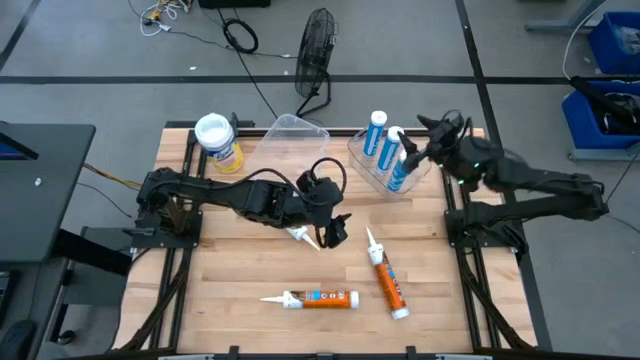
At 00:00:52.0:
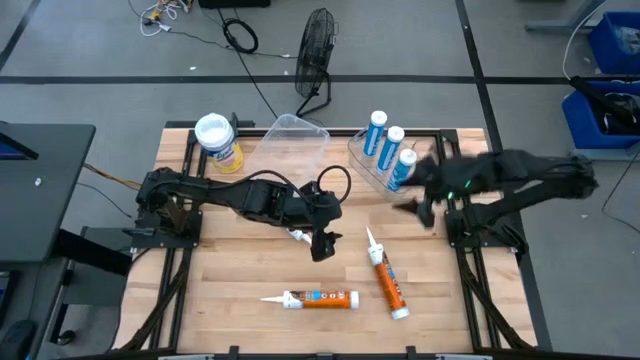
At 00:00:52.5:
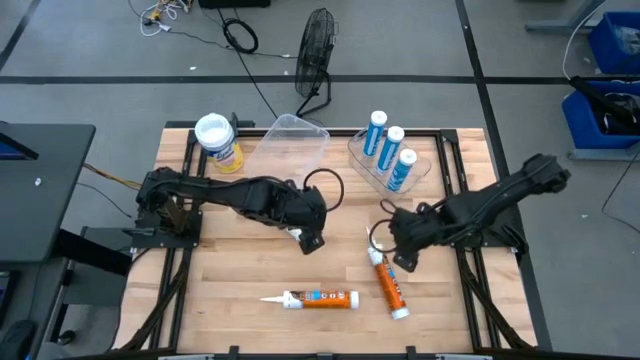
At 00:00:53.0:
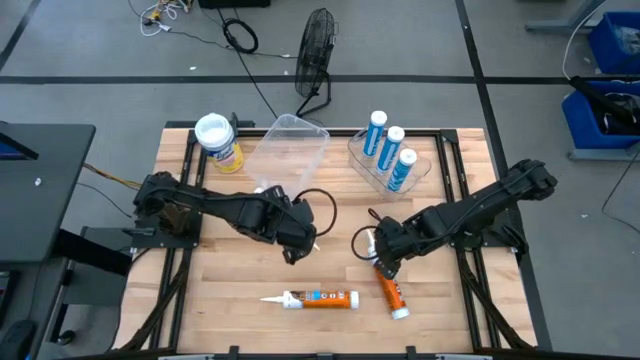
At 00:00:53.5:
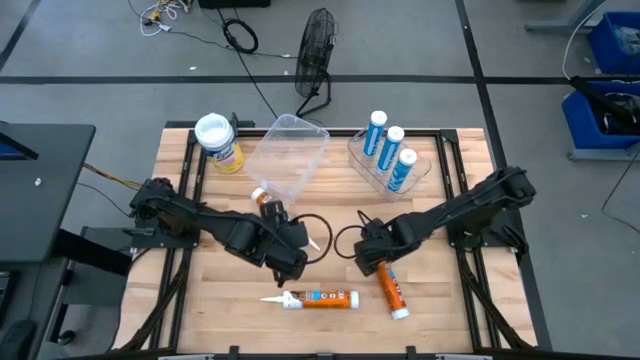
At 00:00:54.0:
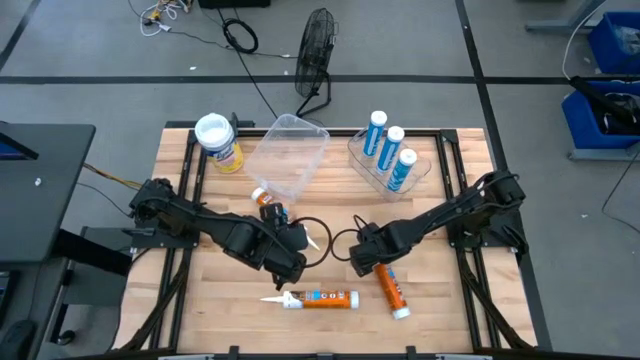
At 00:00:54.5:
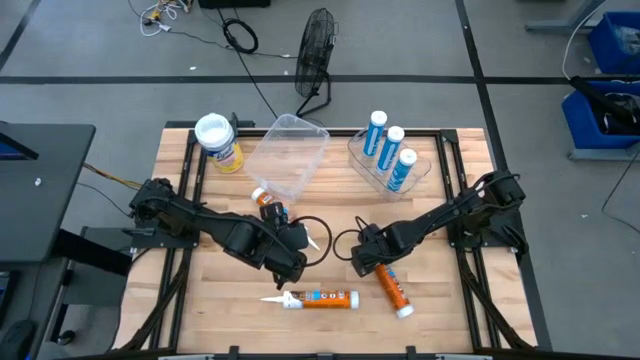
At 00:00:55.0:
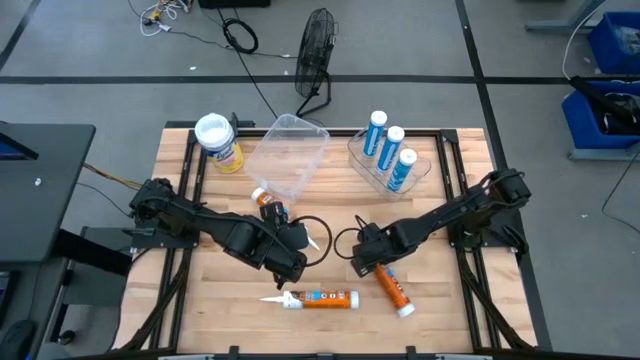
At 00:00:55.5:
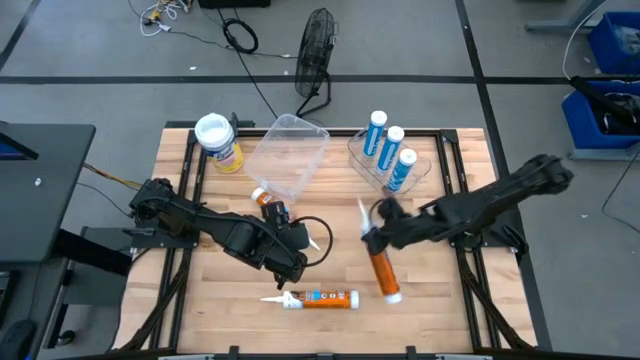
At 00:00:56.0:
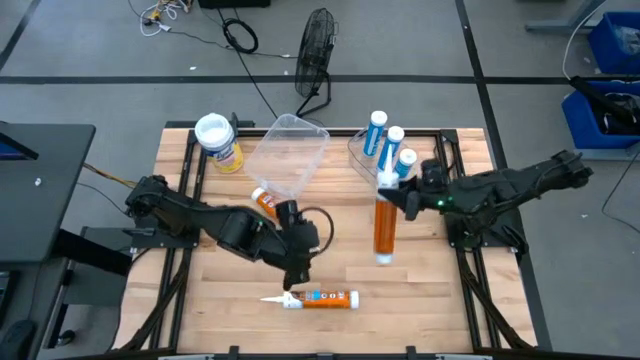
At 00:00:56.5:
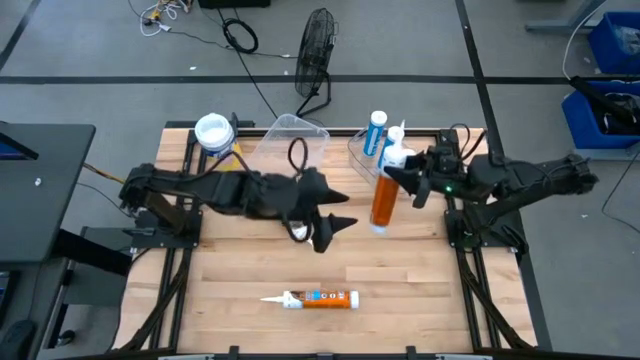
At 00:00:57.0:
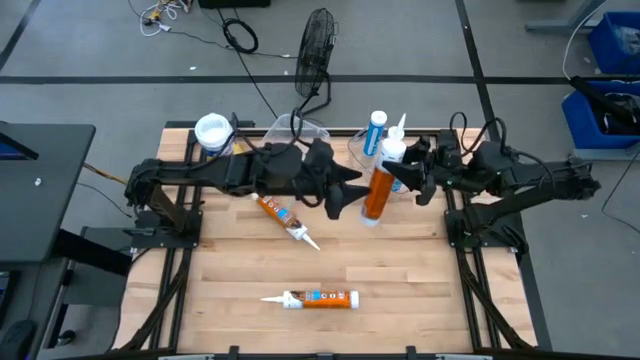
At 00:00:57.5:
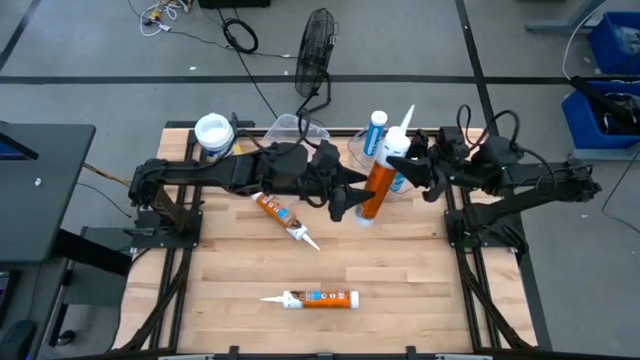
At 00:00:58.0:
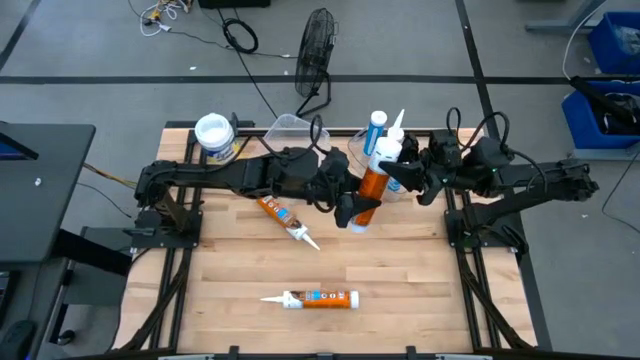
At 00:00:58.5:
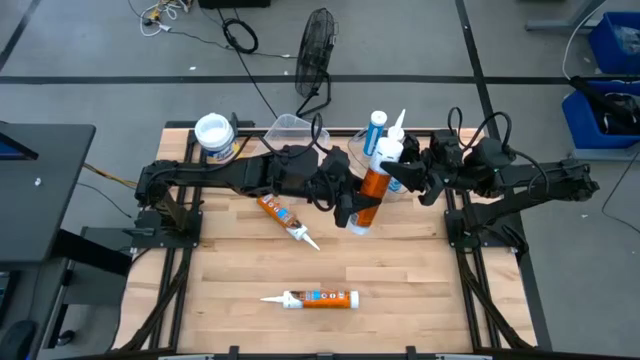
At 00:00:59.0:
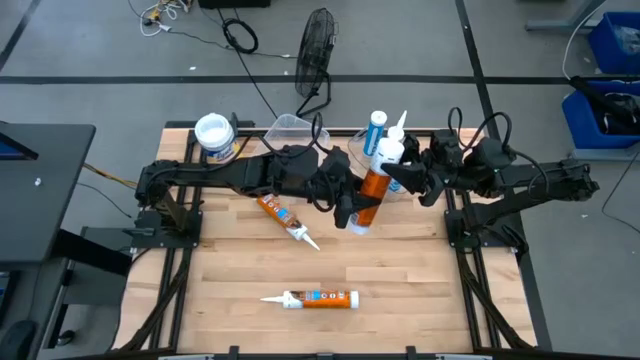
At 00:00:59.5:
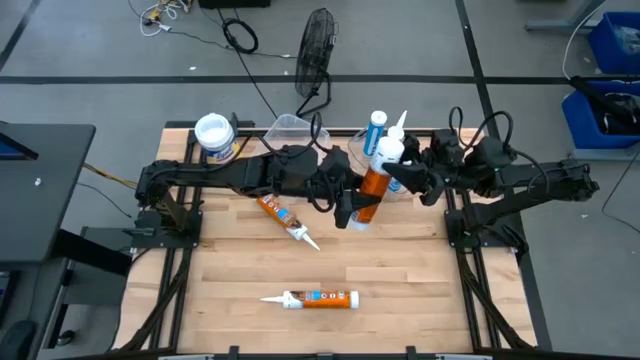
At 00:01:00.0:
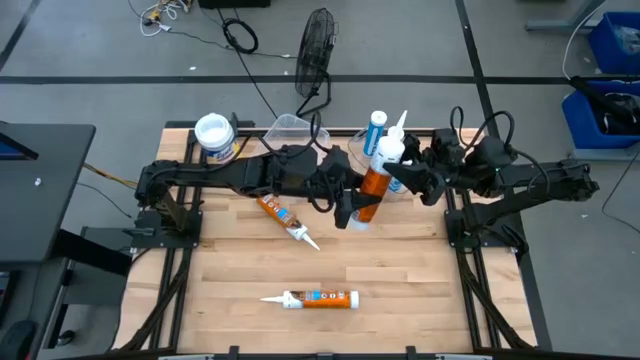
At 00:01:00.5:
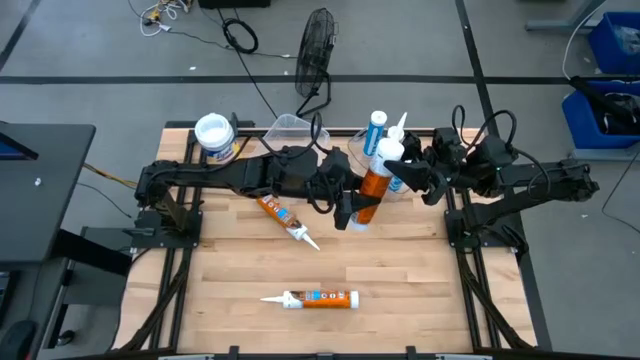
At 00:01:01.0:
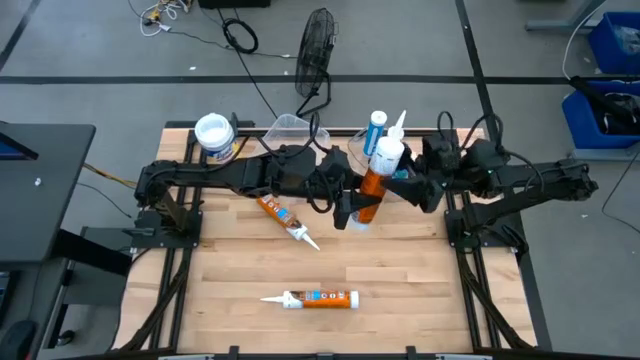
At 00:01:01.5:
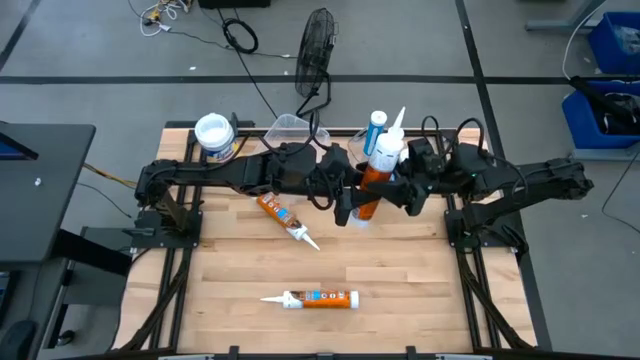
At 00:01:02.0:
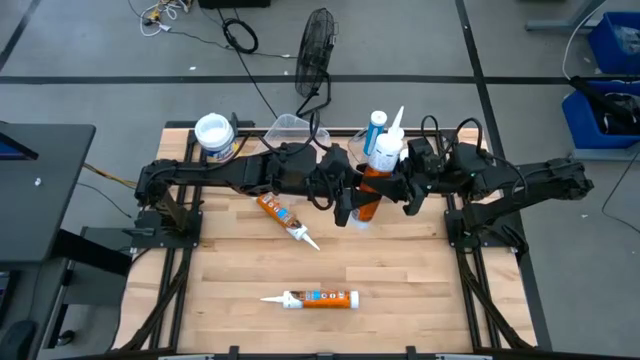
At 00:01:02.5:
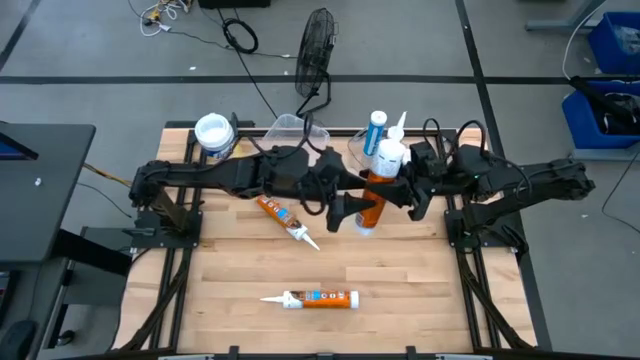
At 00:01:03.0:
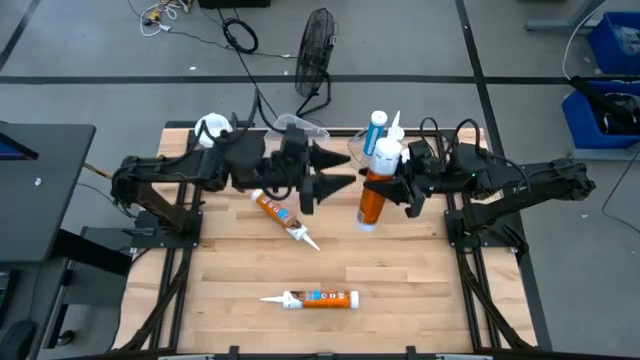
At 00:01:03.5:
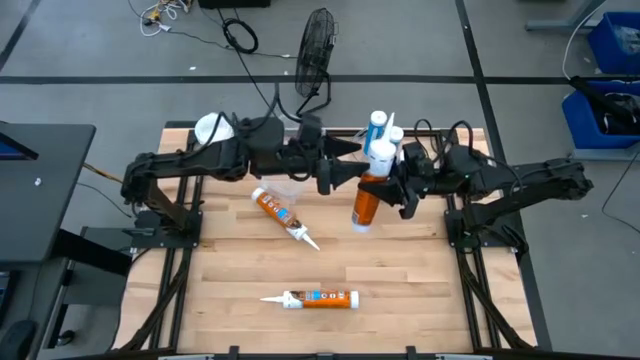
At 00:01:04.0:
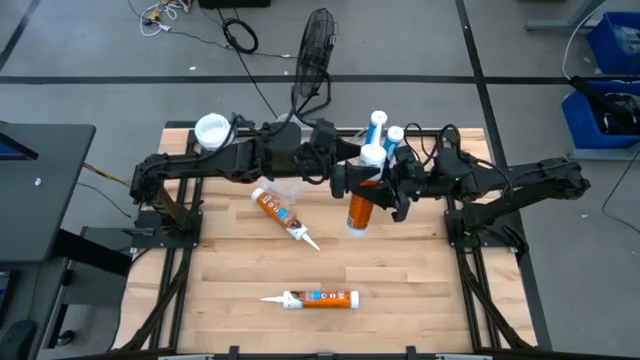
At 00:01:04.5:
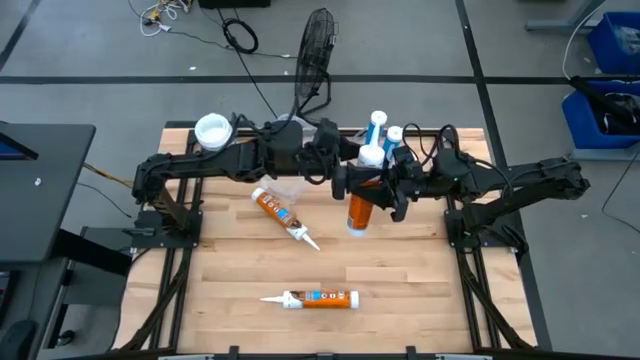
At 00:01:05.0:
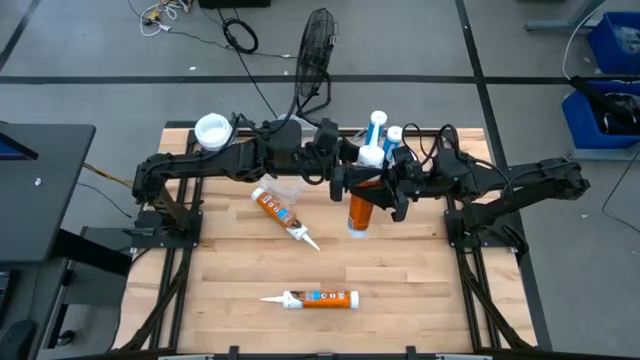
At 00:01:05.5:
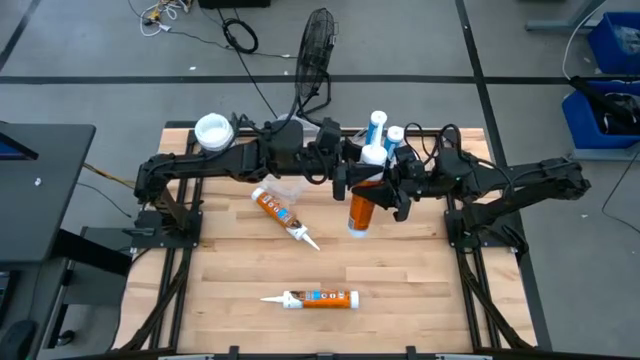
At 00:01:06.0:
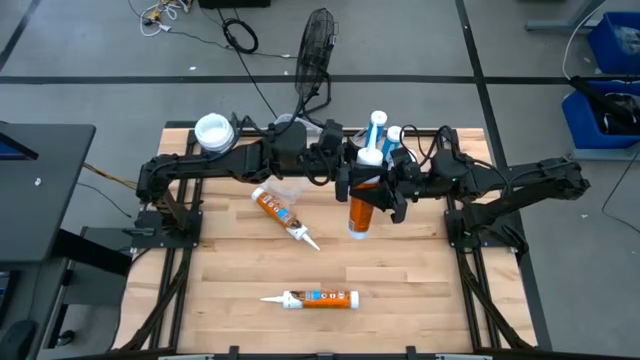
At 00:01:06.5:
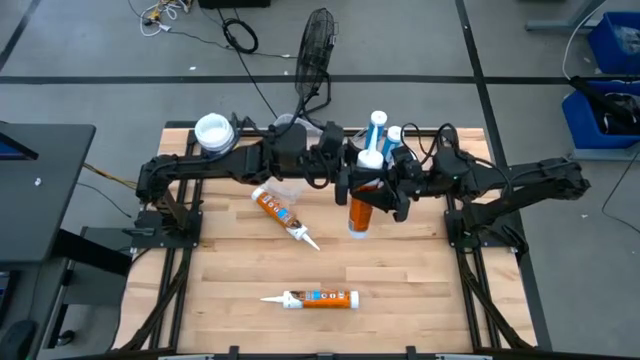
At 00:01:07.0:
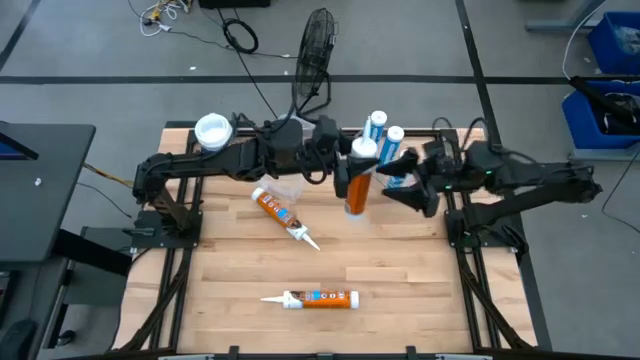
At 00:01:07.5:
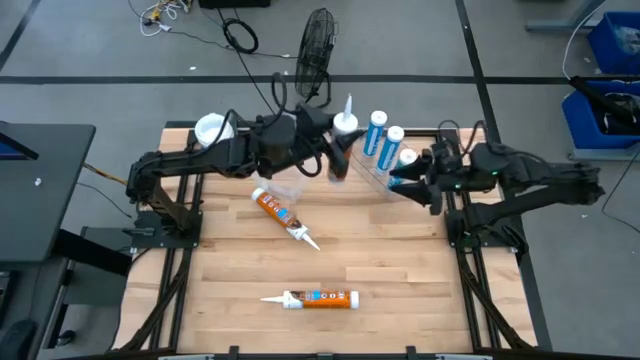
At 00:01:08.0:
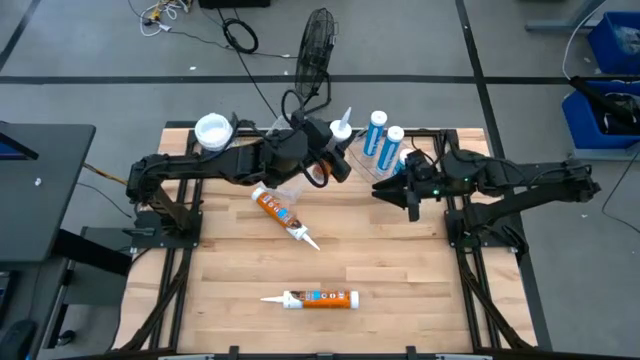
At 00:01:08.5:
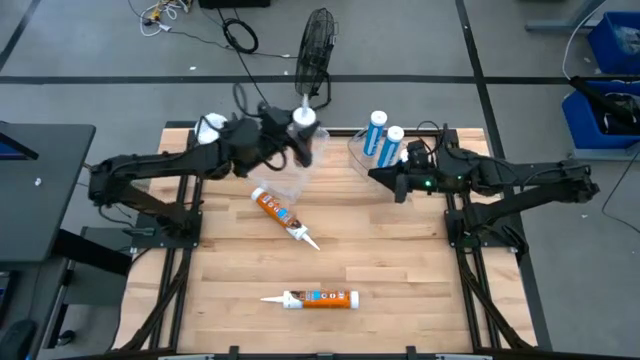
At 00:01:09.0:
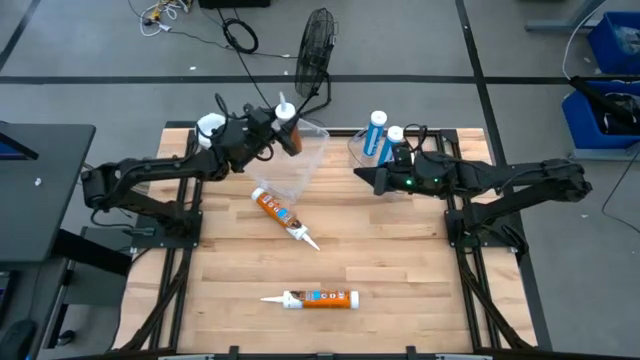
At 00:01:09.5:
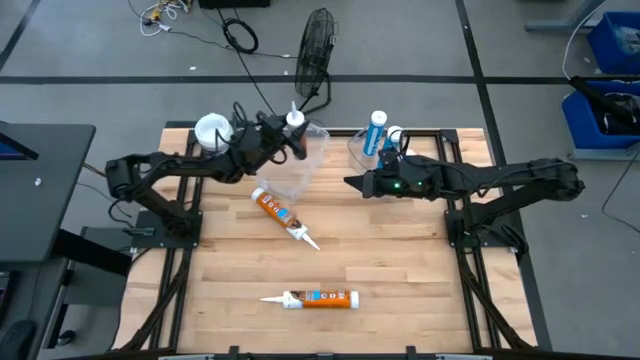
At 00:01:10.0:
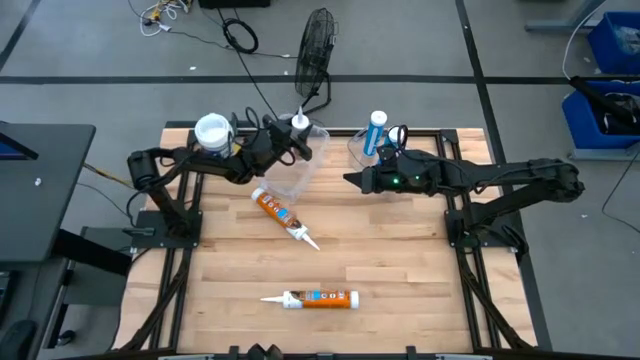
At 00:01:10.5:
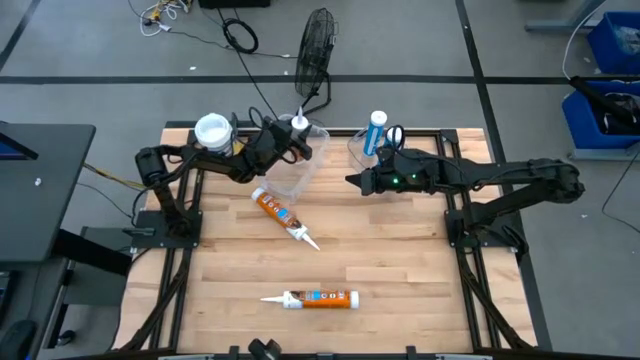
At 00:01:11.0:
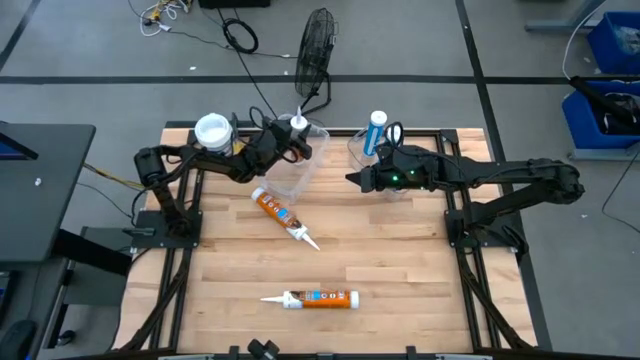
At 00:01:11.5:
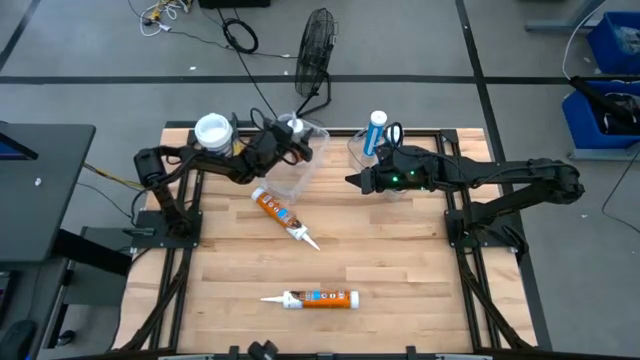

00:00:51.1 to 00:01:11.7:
Task: Pick & place silicon tubes, Sealant and Lysol wipes
Put the bottom right orange sealant into the left transparent bin
